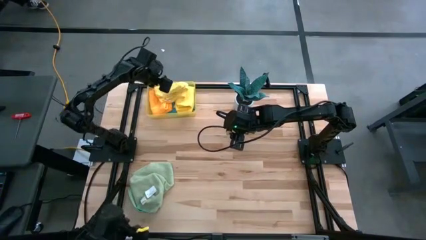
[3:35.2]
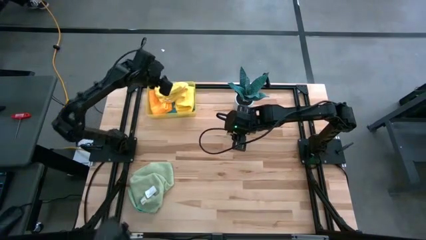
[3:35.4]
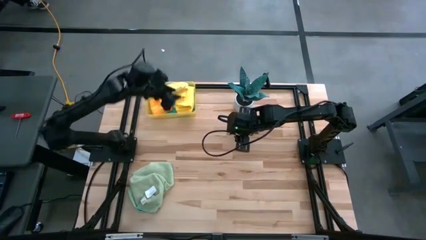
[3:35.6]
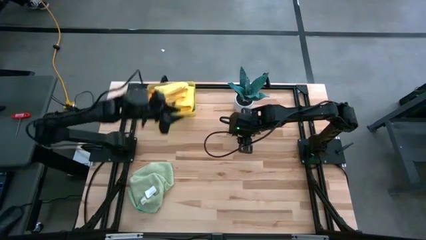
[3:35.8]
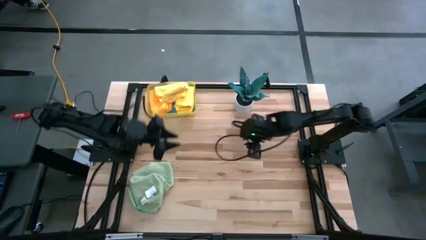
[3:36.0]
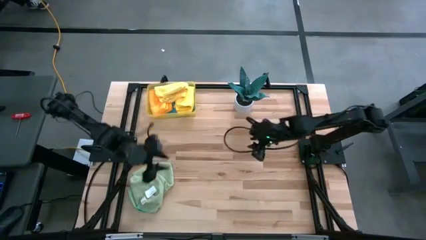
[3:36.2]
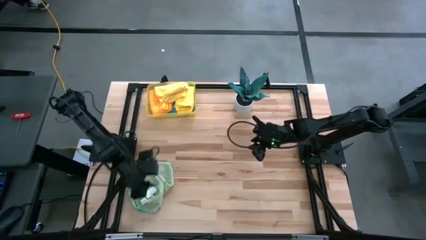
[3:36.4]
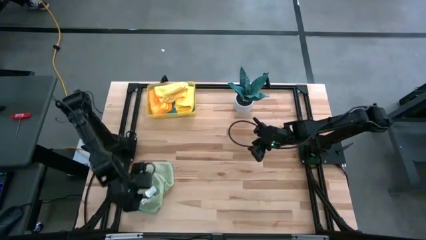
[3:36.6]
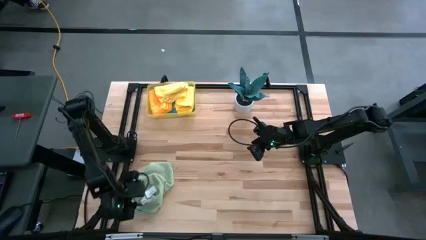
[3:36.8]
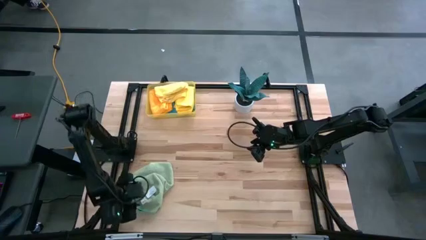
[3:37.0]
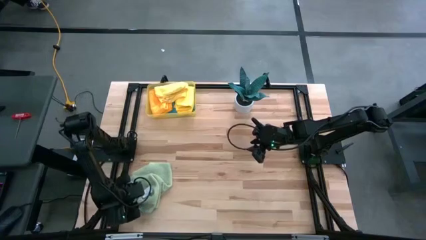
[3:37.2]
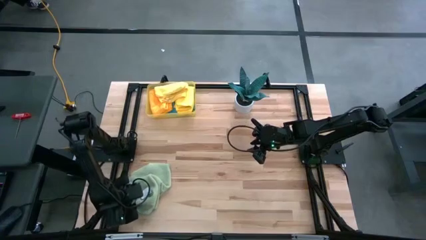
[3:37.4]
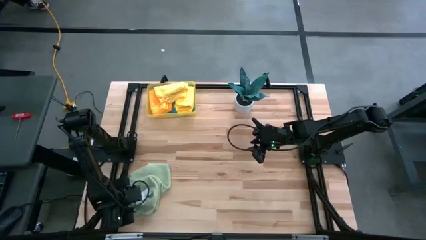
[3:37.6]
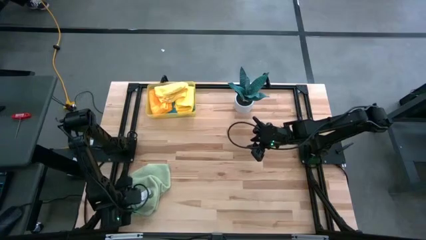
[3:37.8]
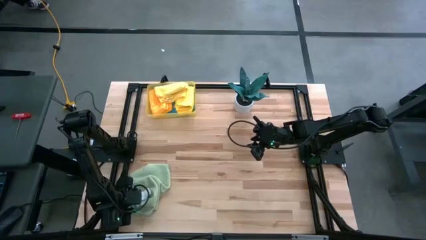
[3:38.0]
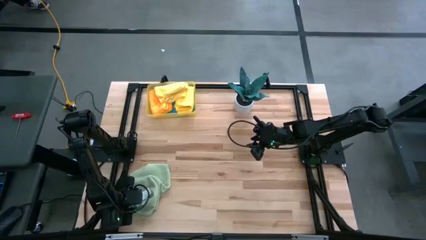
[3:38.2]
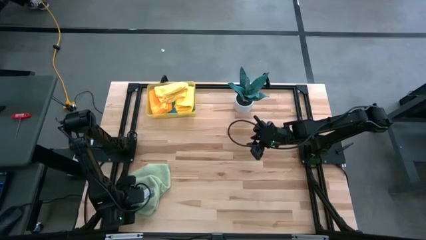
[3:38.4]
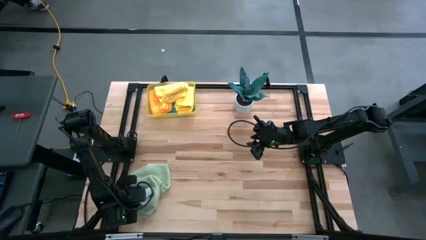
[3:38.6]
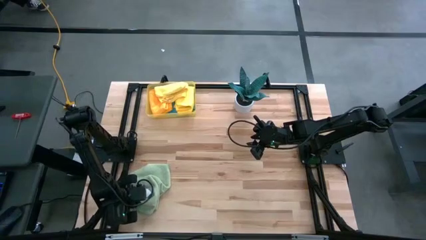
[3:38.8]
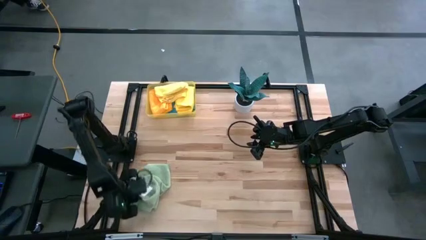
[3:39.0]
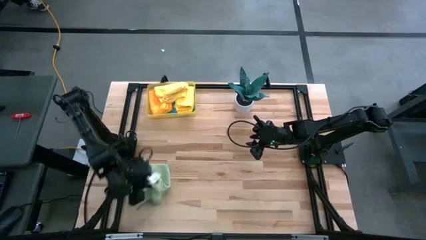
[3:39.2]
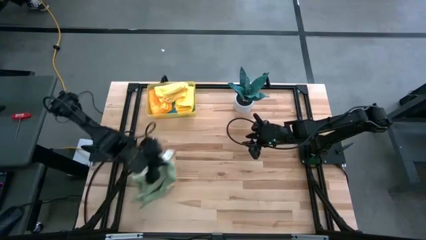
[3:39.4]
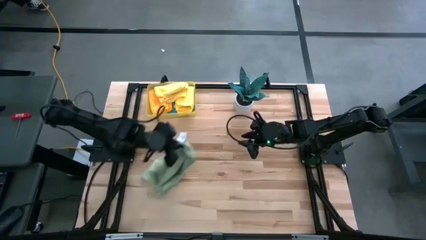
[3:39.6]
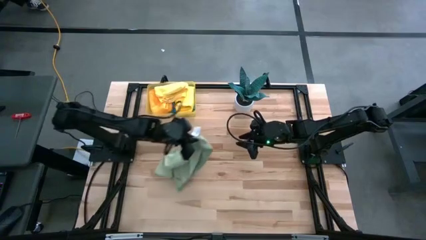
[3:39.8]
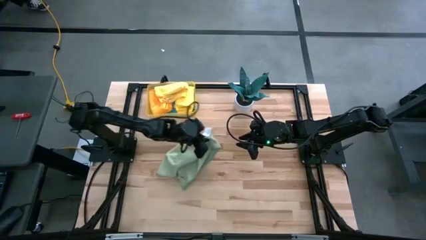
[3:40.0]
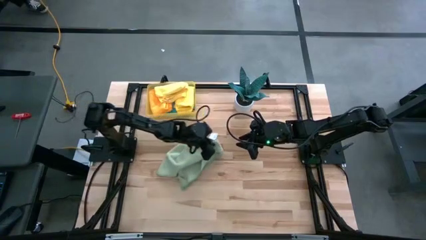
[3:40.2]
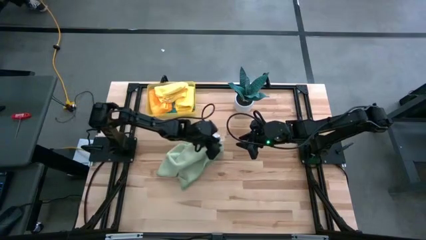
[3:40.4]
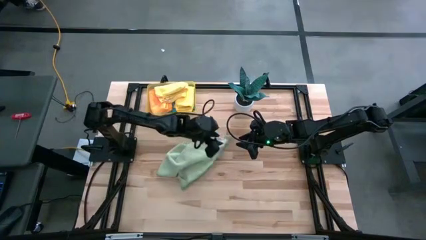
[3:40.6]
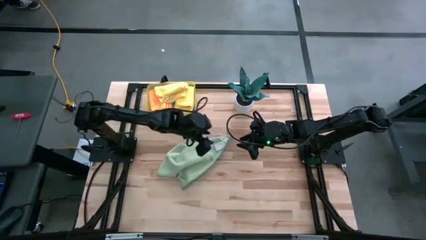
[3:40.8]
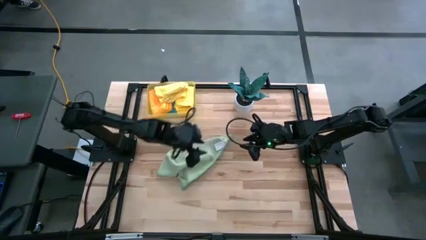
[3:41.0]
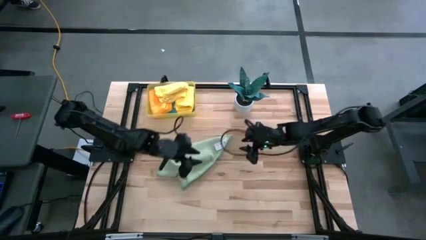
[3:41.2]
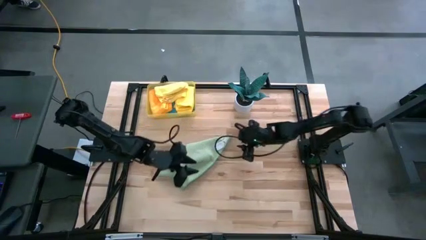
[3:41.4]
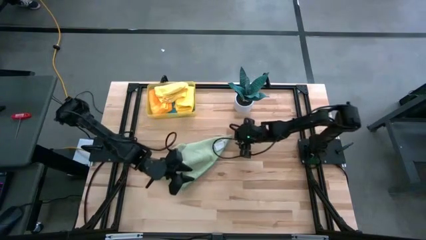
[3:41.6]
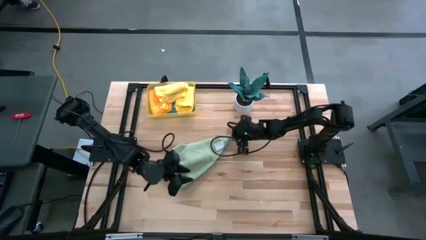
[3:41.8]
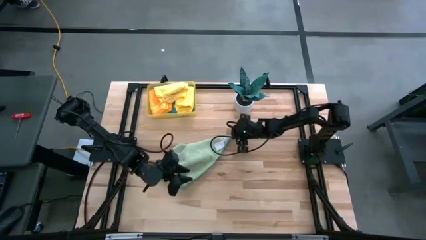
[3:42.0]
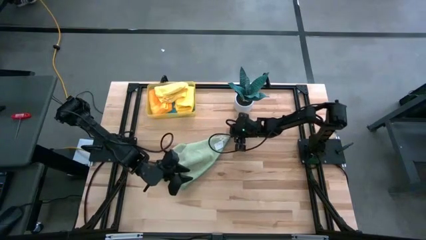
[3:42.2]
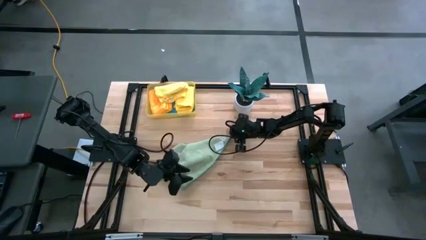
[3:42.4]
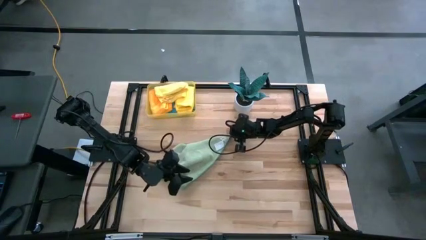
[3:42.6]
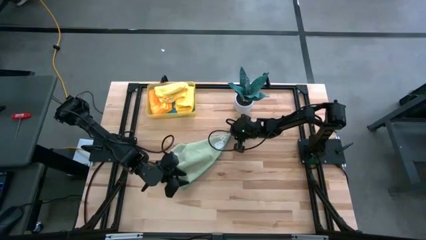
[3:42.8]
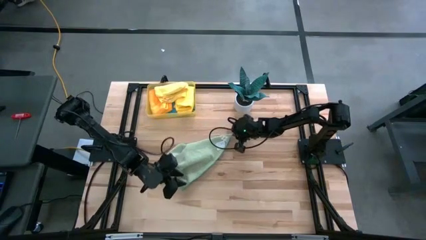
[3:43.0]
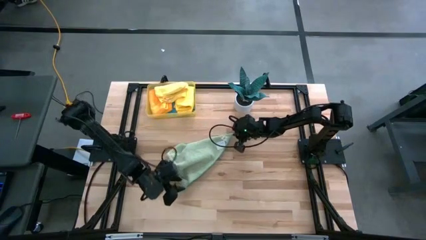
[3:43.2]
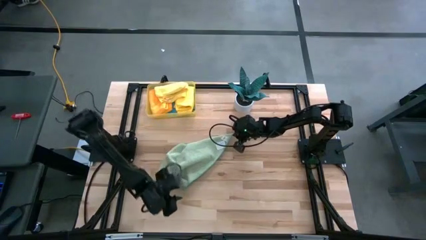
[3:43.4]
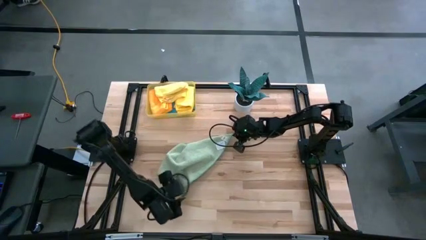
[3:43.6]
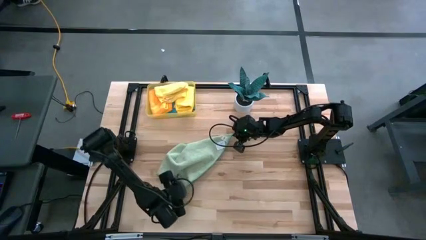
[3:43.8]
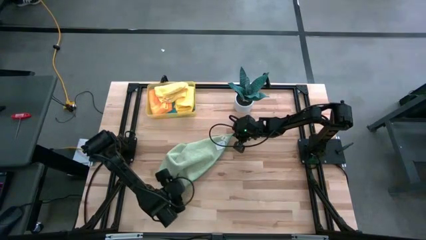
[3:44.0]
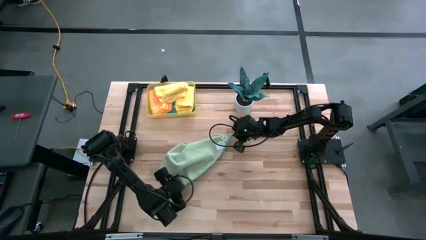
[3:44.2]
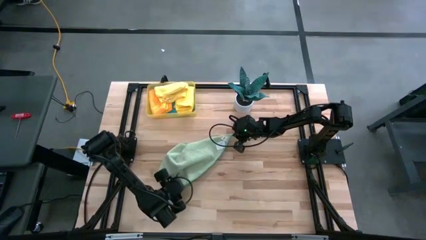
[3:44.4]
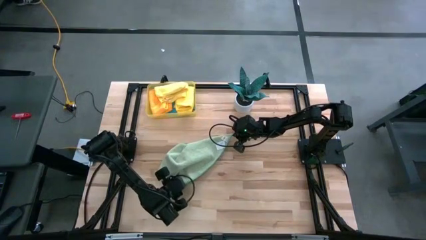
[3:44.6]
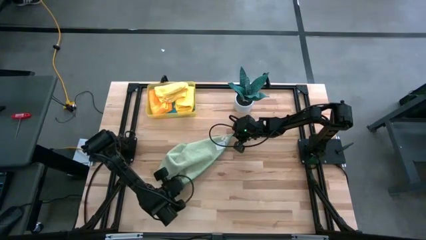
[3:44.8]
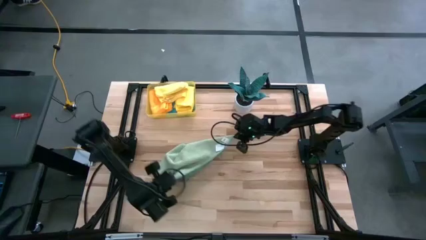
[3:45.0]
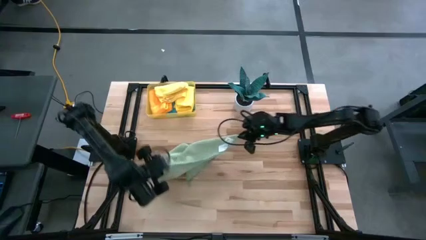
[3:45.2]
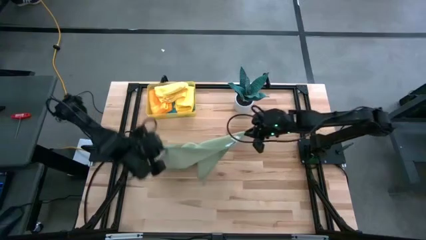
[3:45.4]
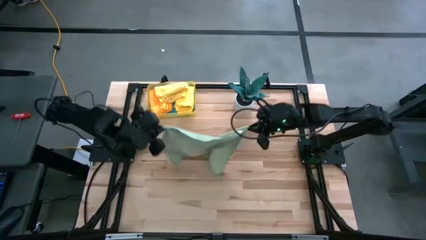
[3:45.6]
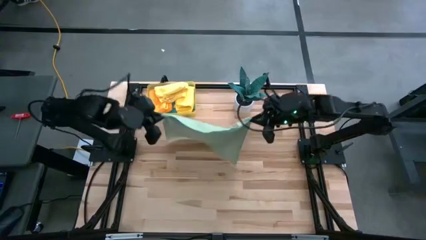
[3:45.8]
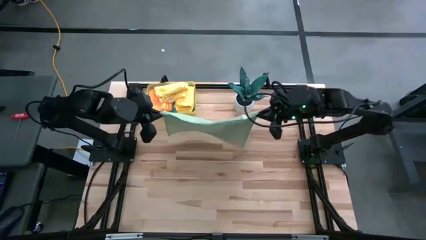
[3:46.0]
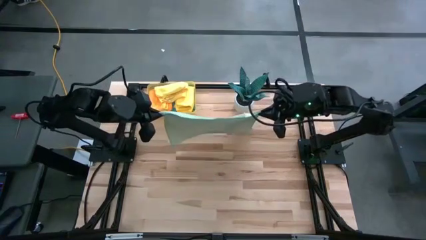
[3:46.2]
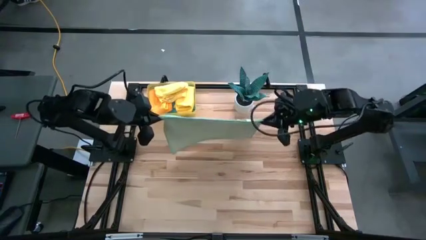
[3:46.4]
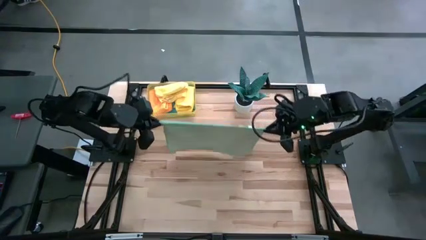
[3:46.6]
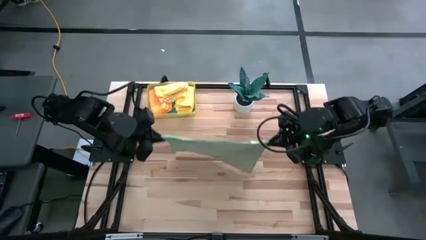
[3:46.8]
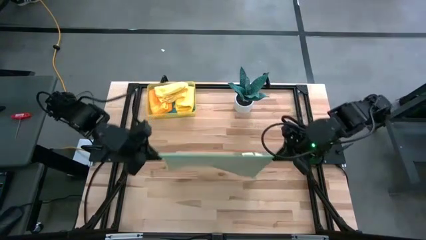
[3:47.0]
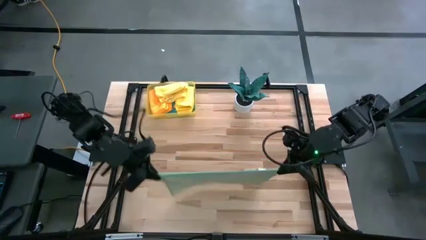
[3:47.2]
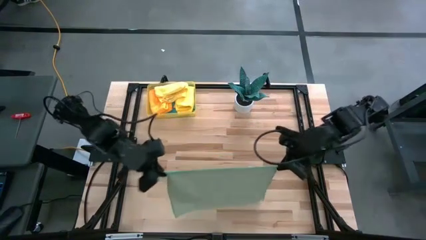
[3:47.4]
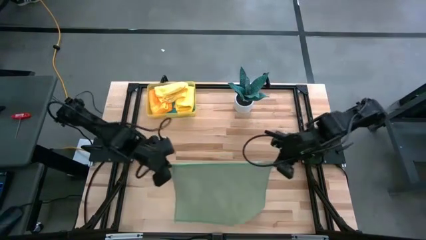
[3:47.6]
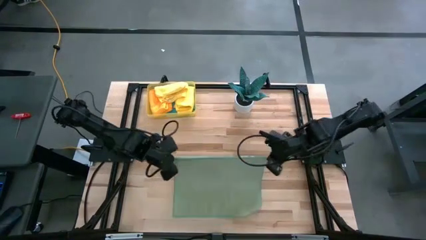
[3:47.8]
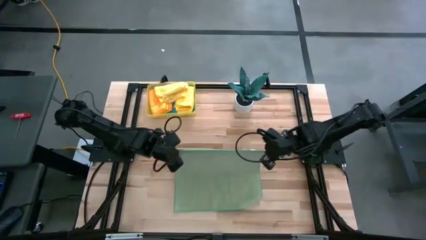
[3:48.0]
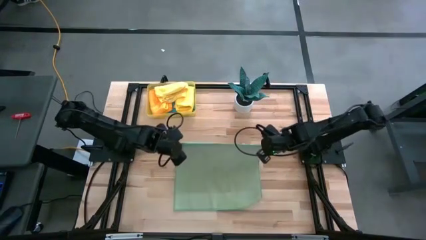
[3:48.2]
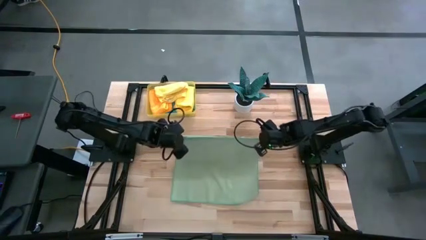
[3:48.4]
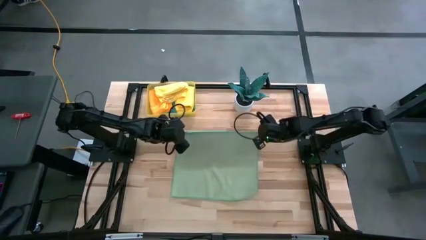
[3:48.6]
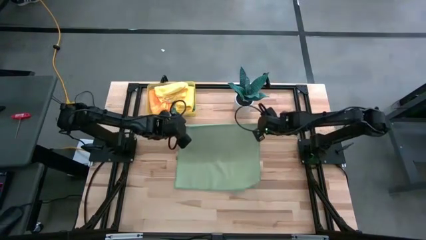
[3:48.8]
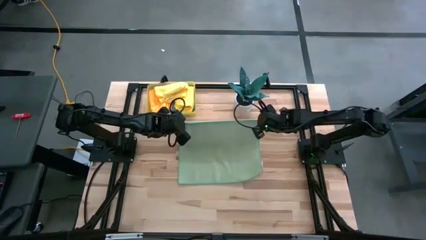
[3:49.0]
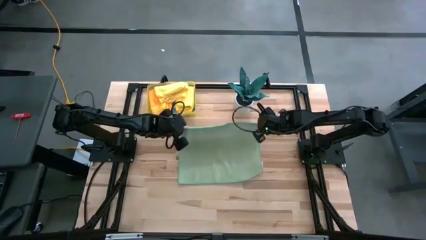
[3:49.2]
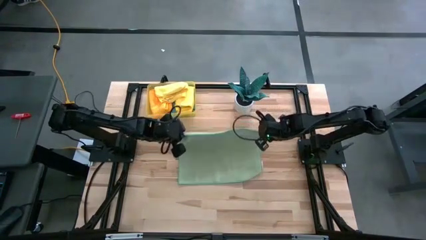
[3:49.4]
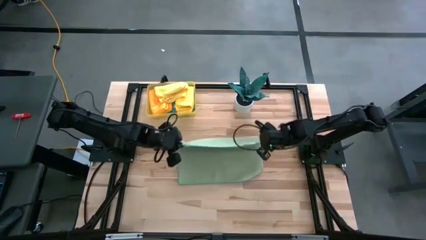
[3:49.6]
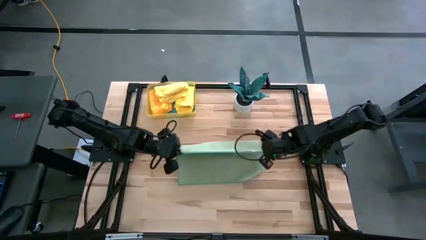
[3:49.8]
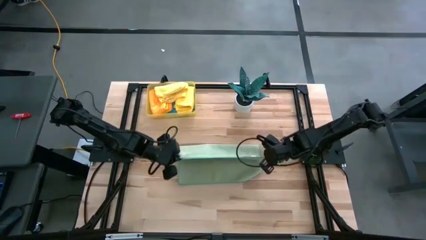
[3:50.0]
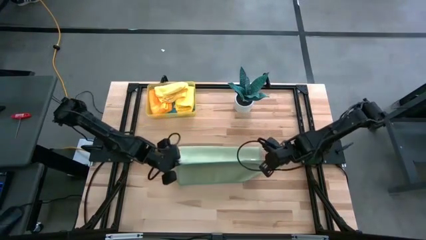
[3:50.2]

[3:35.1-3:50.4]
Task: Fold microfiber towels
Fold the green microfiber cloth
